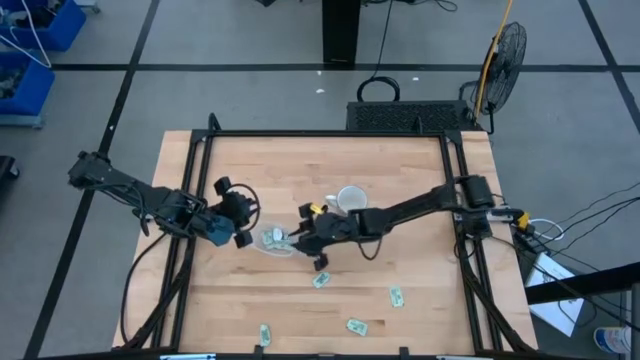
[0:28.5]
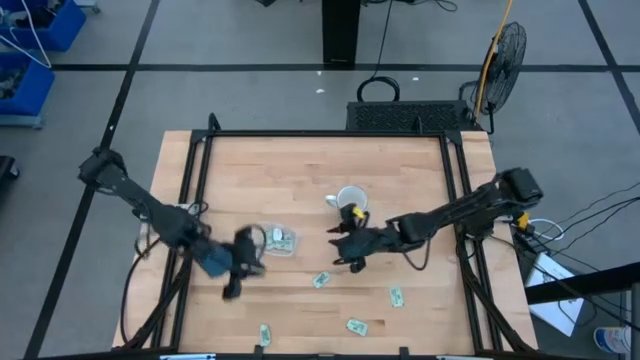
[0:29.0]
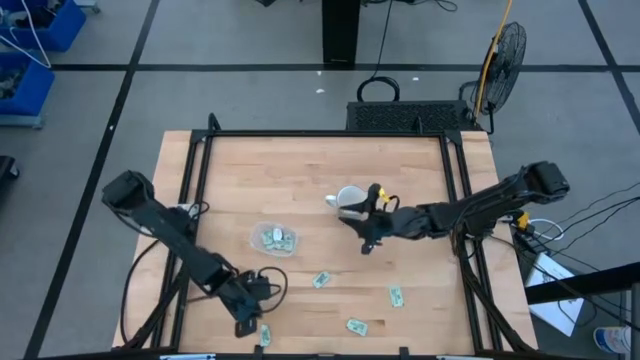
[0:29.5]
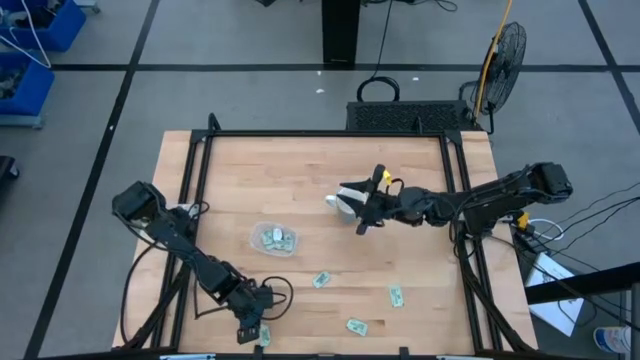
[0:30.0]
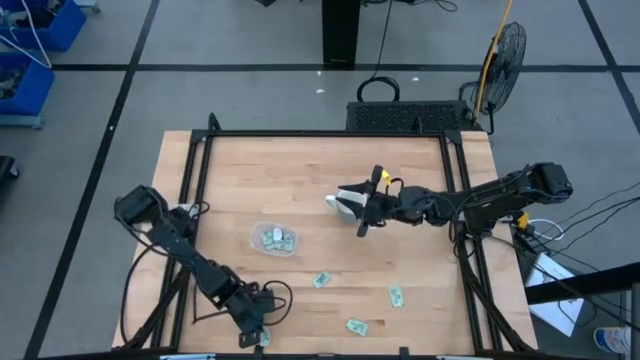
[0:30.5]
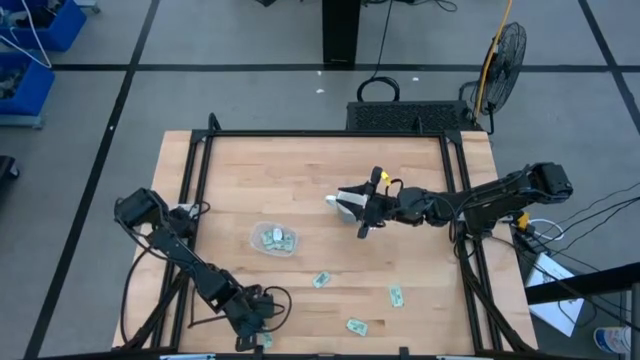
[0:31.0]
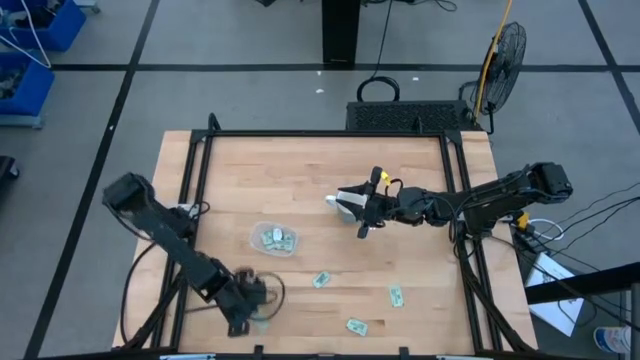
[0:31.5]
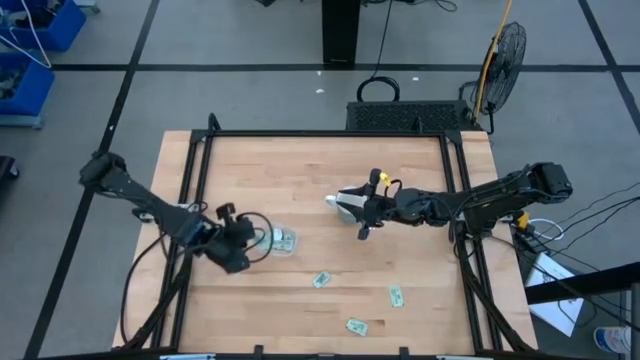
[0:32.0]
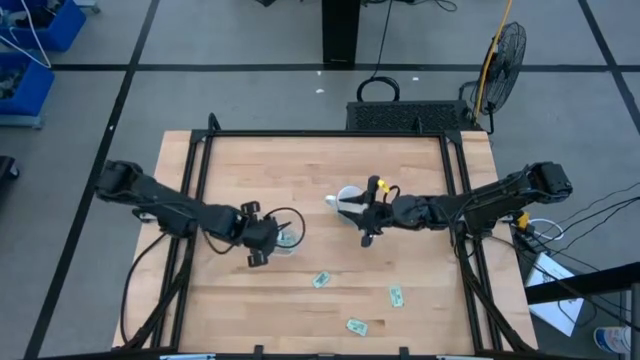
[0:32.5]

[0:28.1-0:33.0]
Task: Pick and place Stevia / Truvia into bins
Put the green stevia packet into the transparent bin

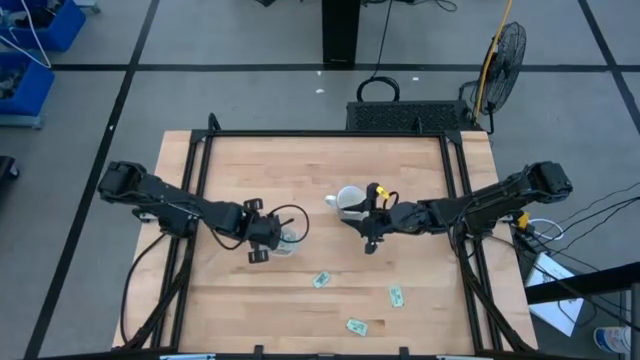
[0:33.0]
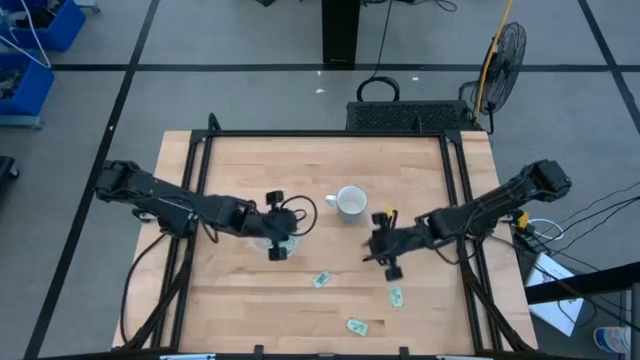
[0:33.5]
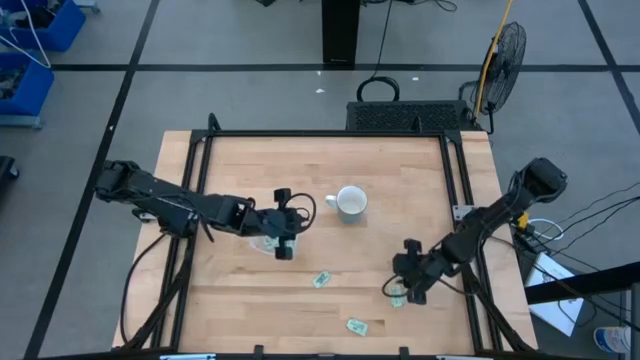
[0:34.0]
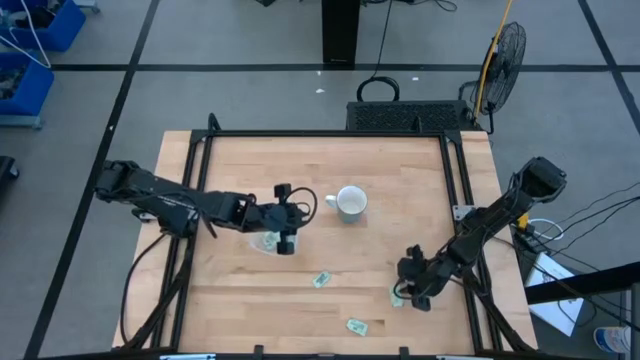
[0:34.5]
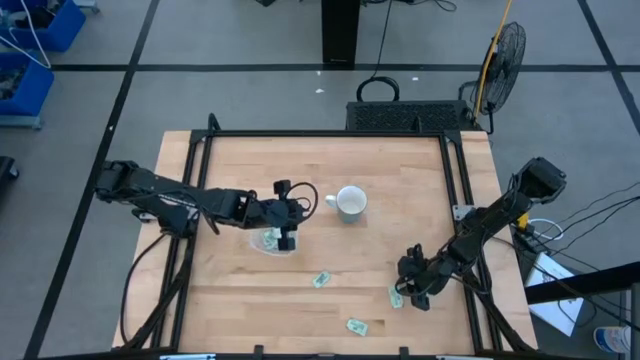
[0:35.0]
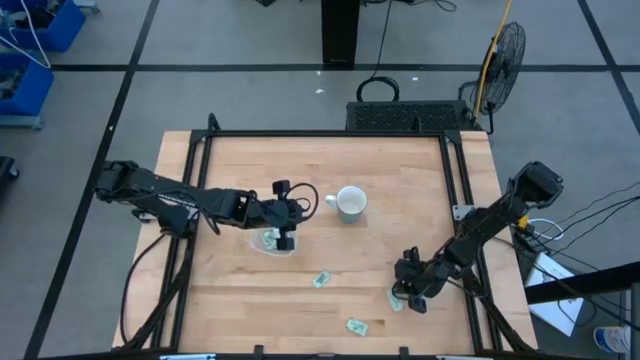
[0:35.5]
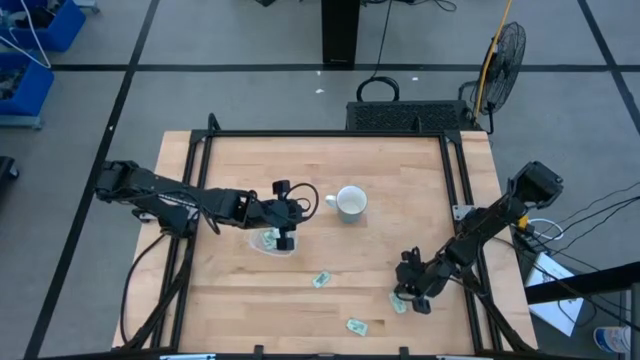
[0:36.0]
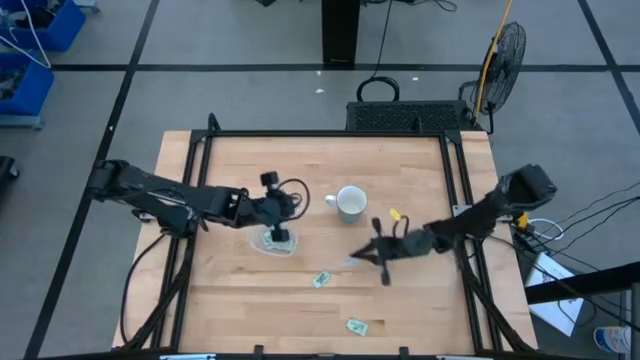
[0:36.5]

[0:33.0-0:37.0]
Put the green stevia packet into the transparent bin

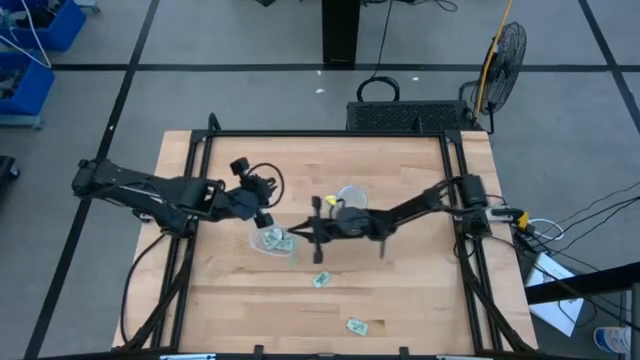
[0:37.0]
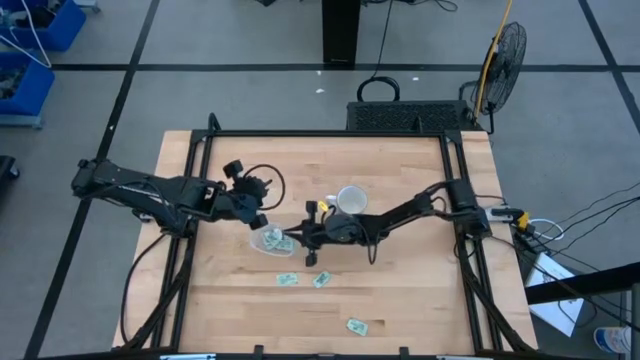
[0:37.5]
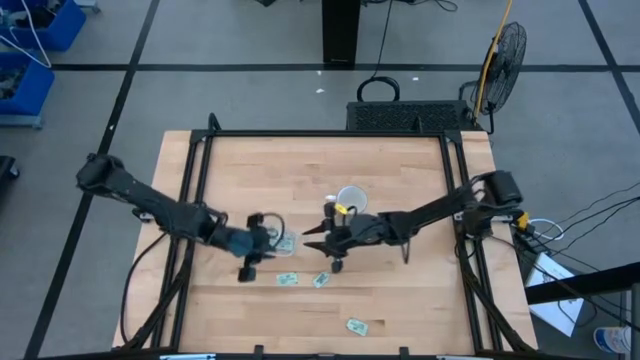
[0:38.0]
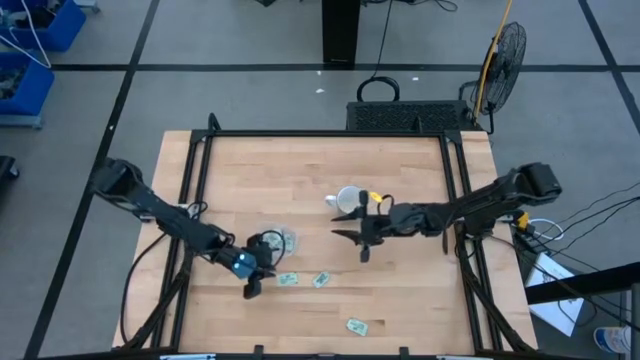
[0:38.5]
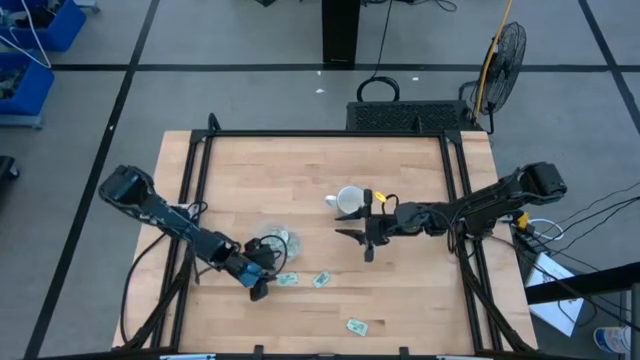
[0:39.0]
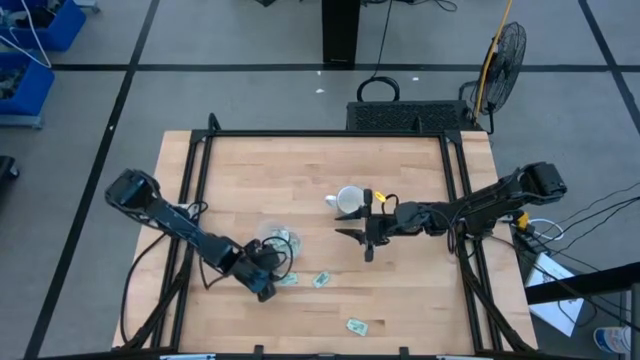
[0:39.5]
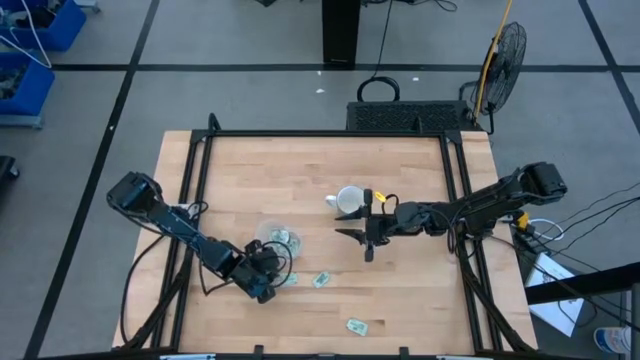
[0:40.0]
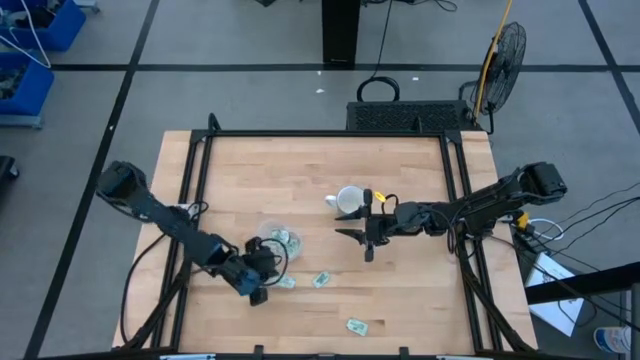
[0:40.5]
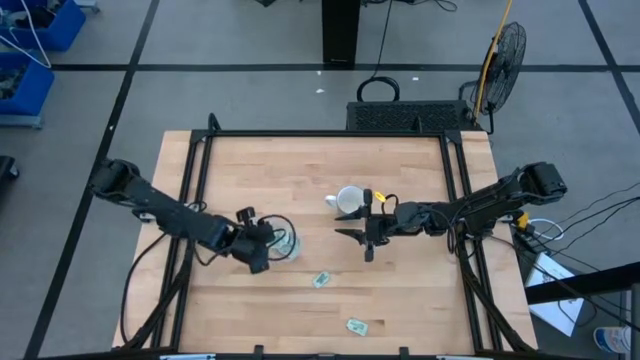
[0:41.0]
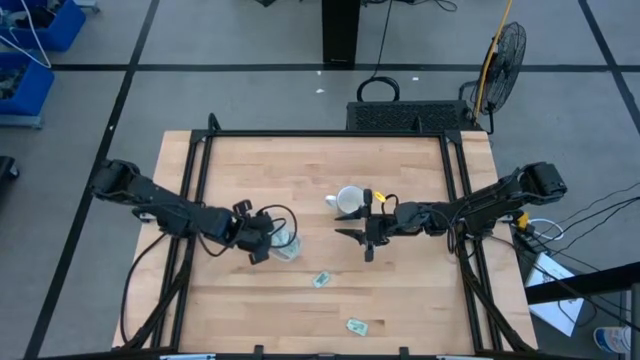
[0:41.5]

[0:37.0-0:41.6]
Put the green stevia packet into the transparent bin

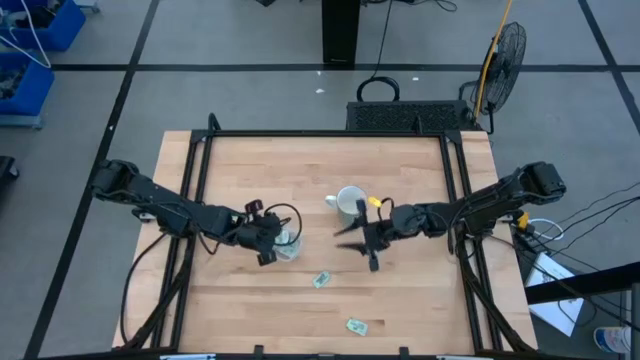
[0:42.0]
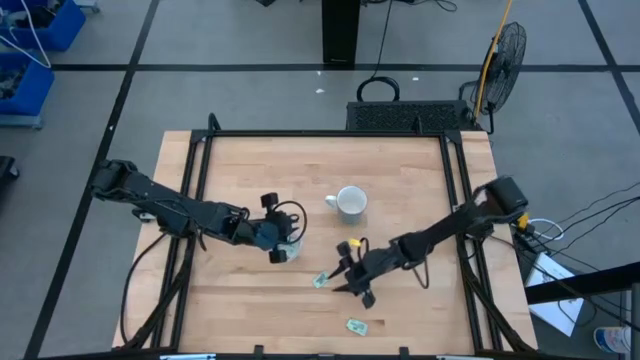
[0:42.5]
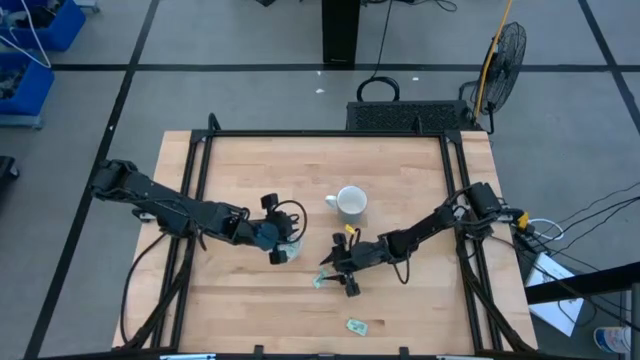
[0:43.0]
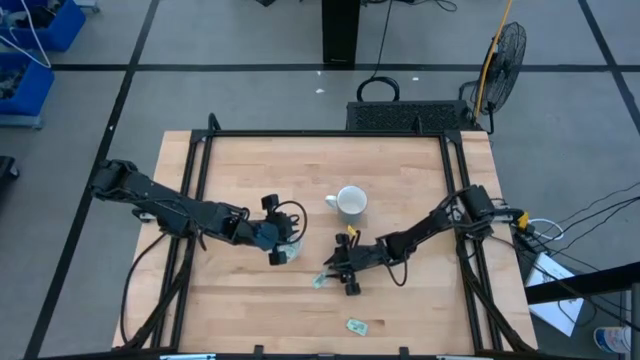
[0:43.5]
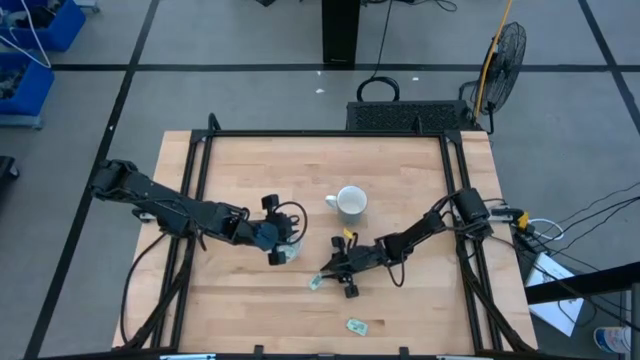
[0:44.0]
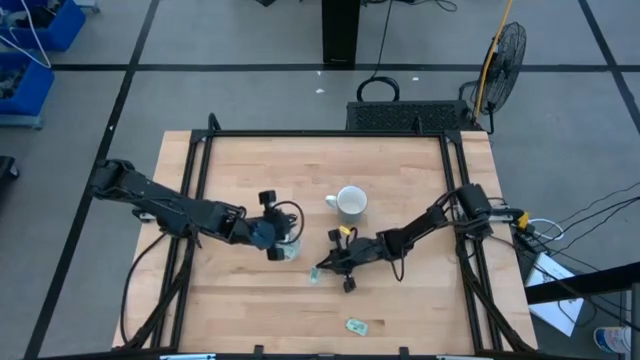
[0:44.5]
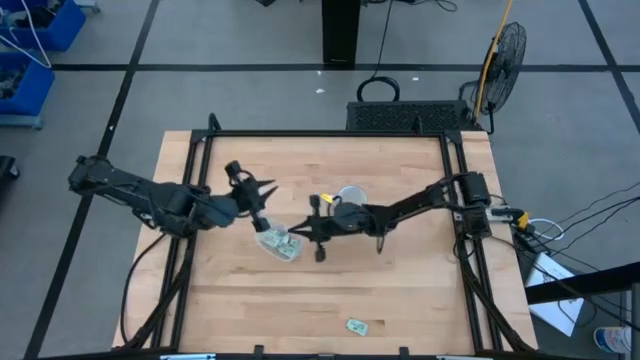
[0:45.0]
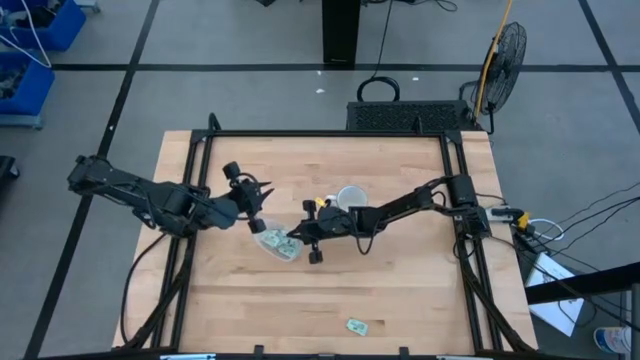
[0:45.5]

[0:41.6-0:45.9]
Put the green stevia packet into the transparent bin

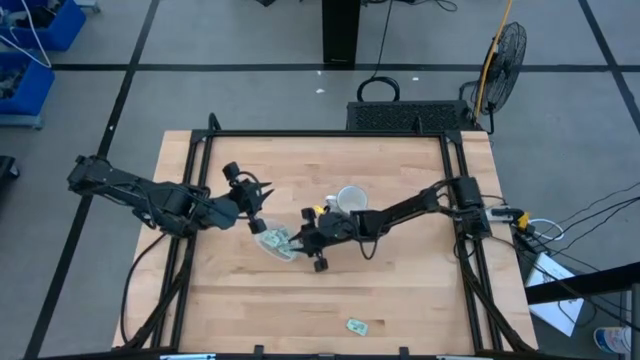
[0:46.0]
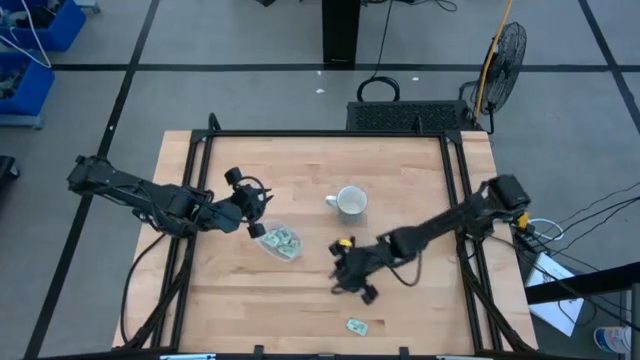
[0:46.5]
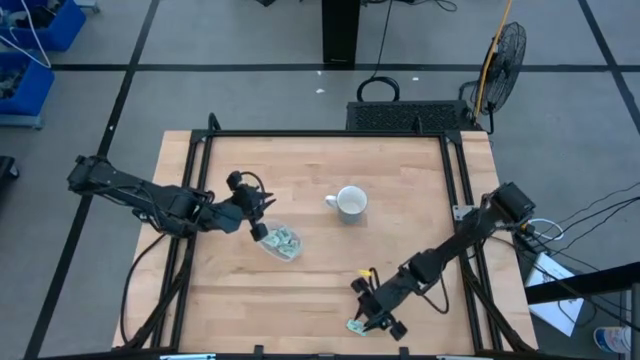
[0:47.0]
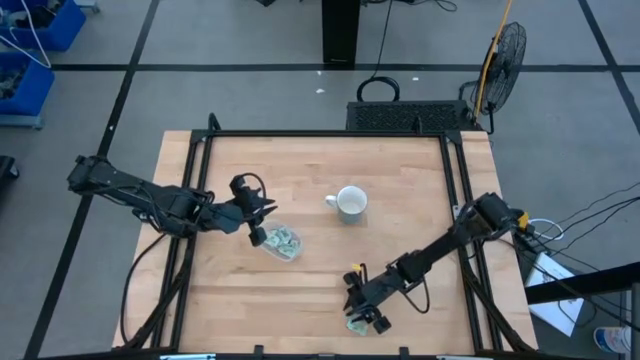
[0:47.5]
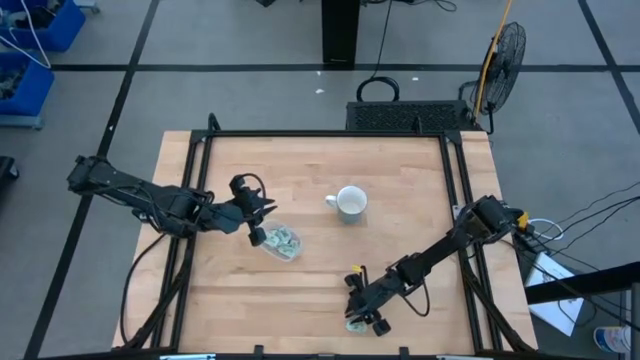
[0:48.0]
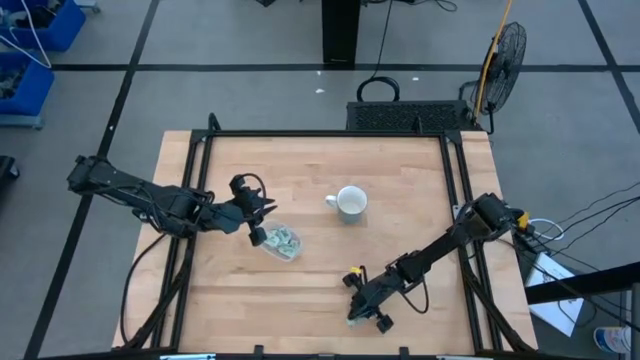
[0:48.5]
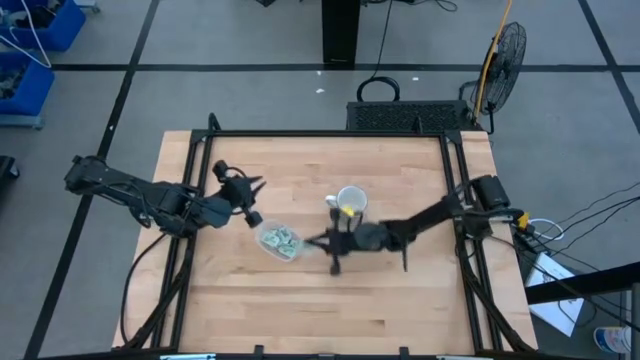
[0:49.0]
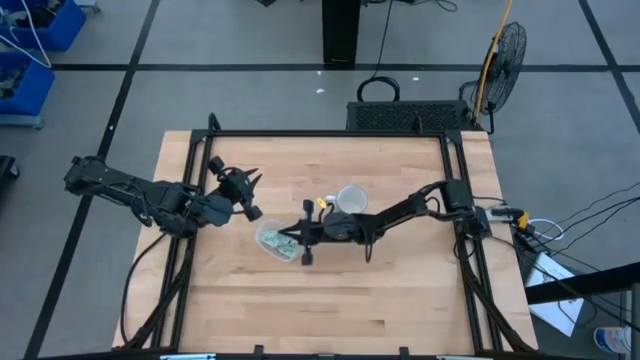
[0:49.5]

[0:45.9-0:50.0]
Put the green stevia packet into the transparent bin
